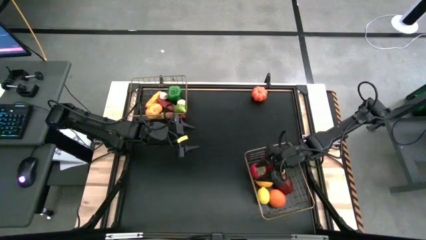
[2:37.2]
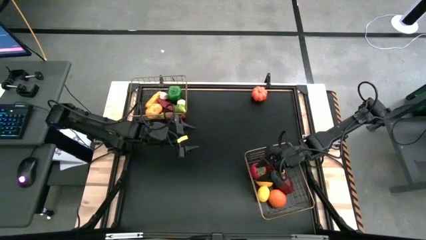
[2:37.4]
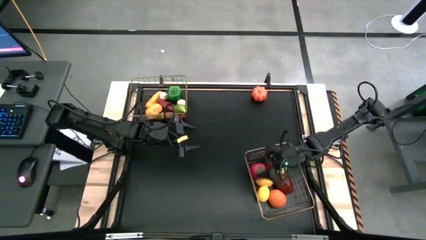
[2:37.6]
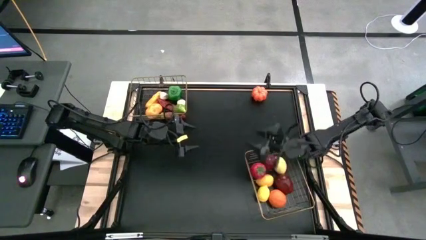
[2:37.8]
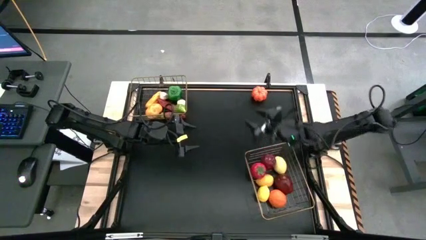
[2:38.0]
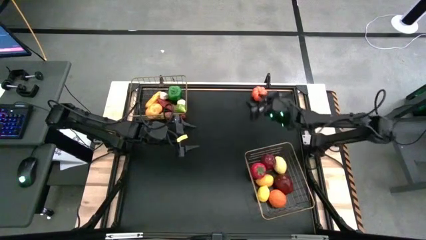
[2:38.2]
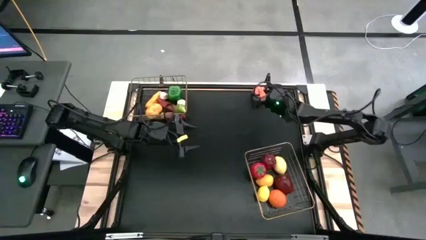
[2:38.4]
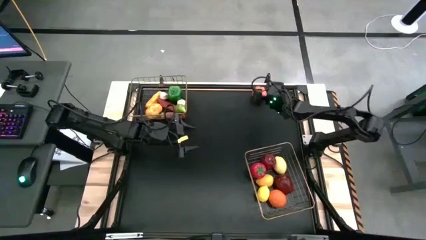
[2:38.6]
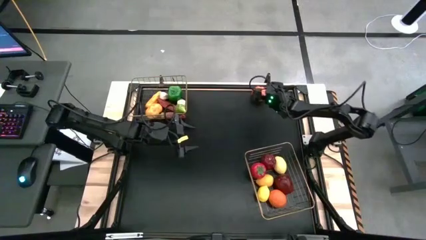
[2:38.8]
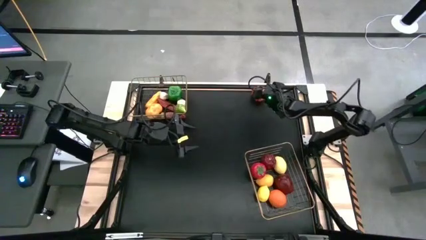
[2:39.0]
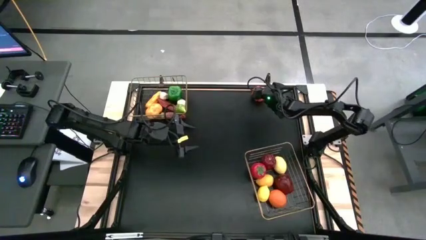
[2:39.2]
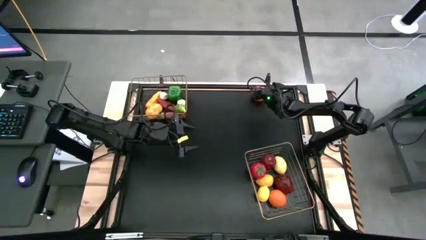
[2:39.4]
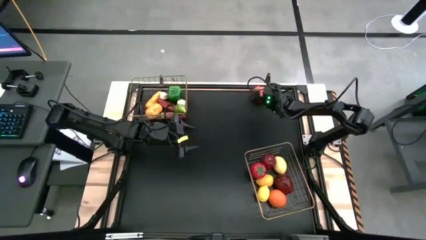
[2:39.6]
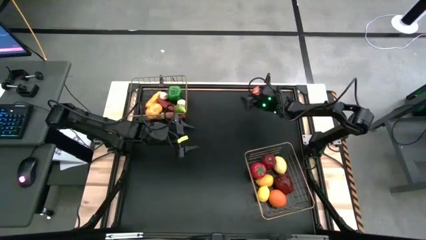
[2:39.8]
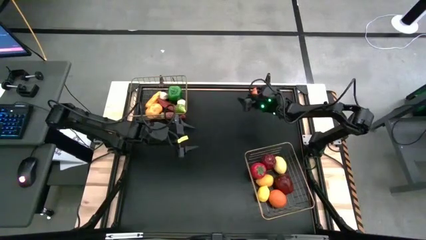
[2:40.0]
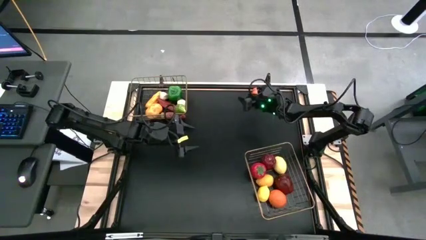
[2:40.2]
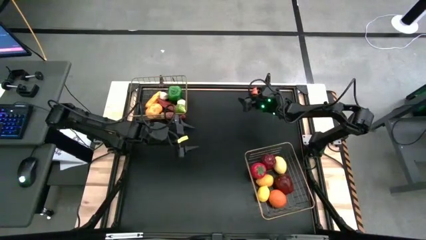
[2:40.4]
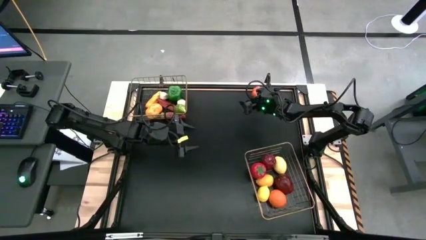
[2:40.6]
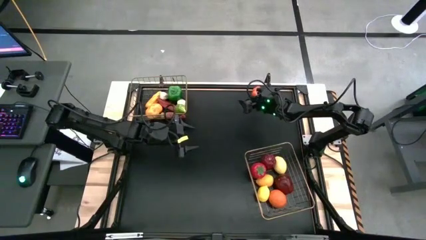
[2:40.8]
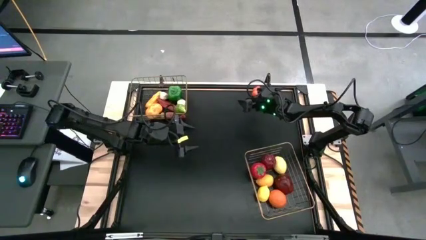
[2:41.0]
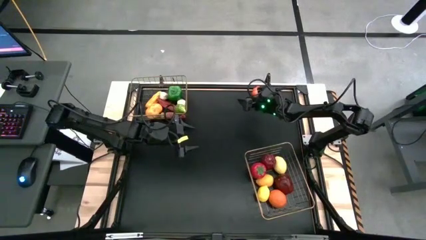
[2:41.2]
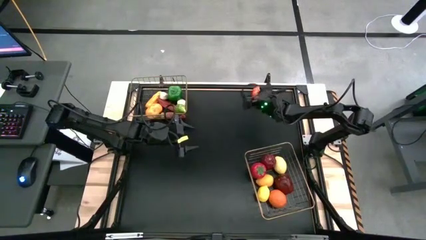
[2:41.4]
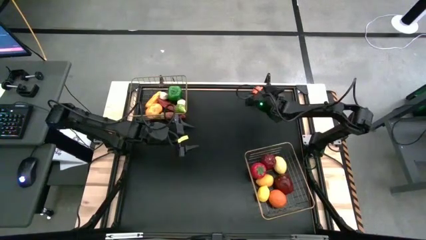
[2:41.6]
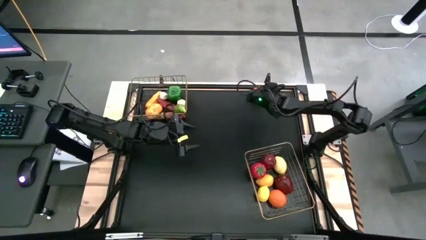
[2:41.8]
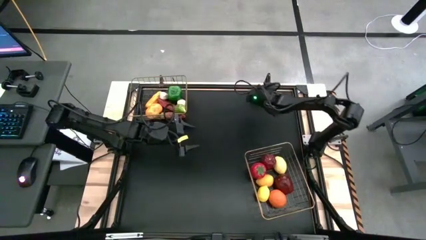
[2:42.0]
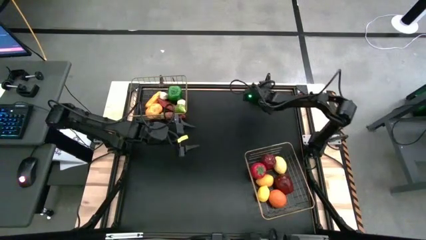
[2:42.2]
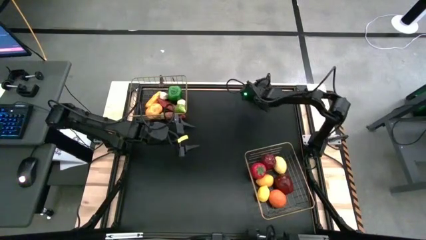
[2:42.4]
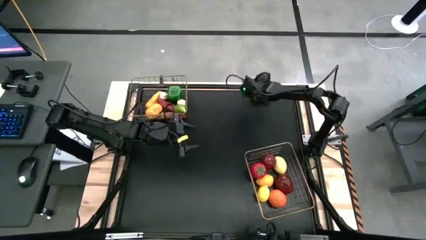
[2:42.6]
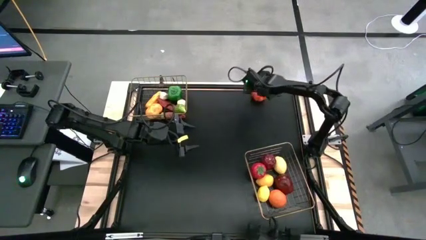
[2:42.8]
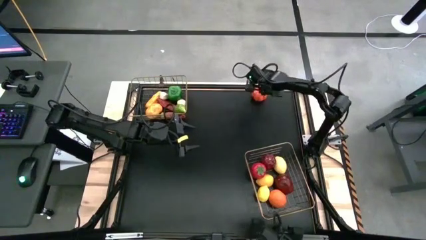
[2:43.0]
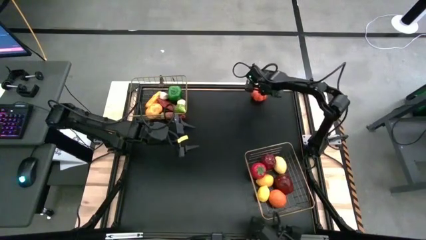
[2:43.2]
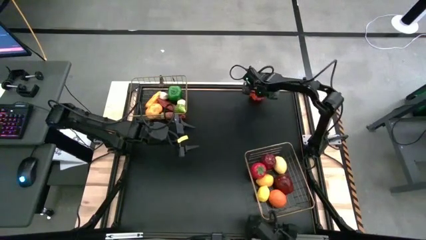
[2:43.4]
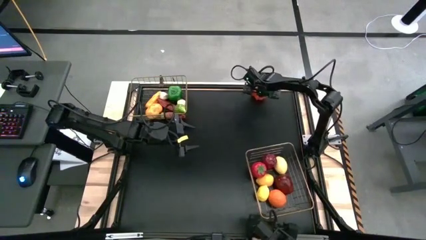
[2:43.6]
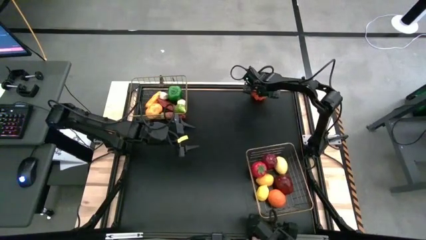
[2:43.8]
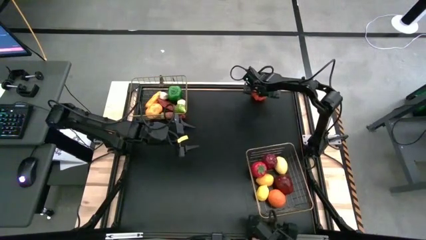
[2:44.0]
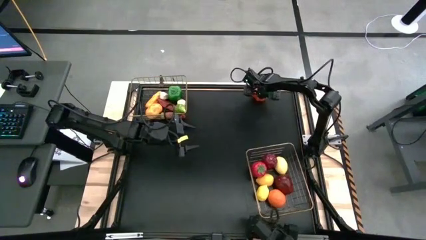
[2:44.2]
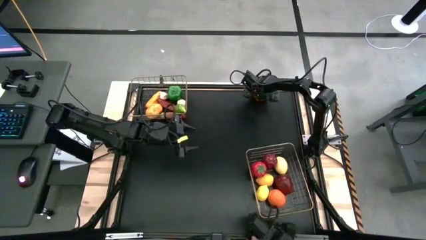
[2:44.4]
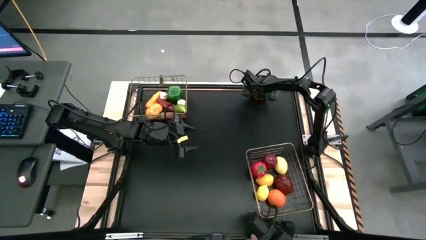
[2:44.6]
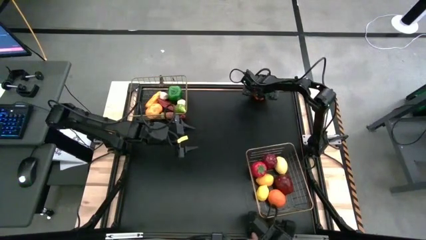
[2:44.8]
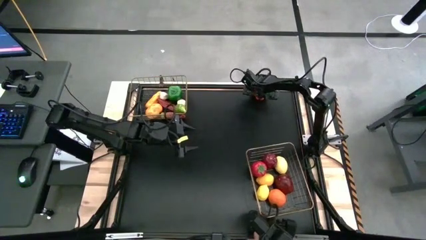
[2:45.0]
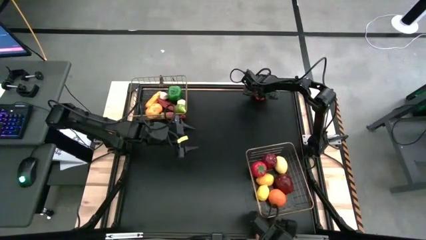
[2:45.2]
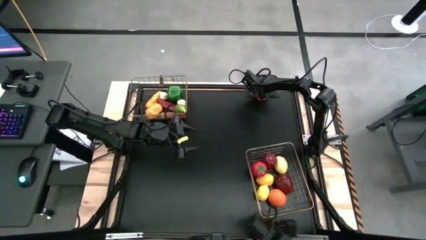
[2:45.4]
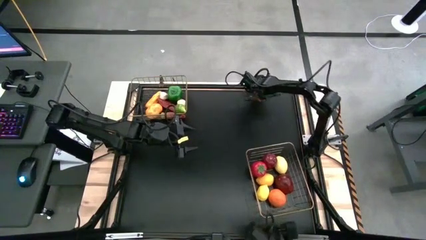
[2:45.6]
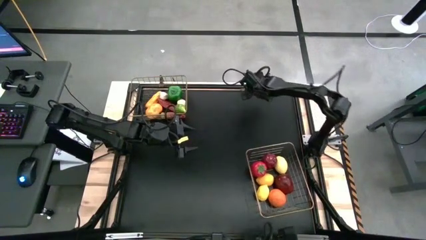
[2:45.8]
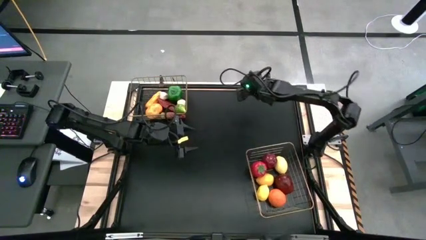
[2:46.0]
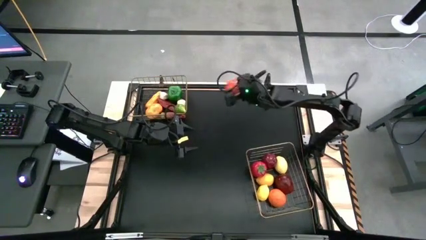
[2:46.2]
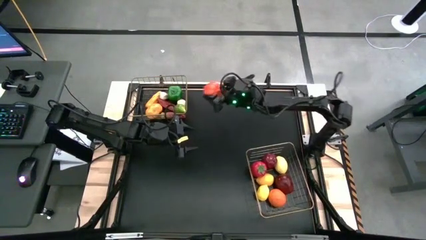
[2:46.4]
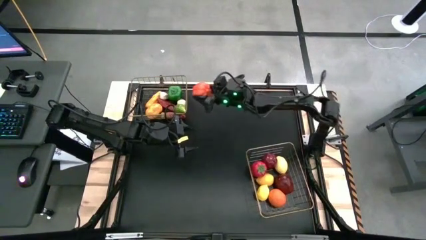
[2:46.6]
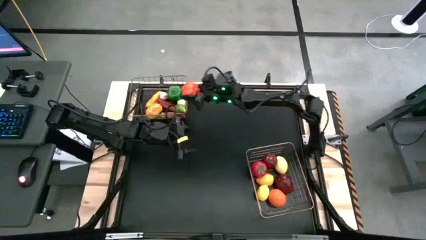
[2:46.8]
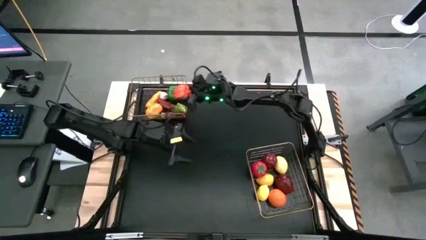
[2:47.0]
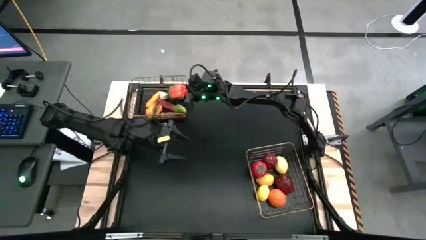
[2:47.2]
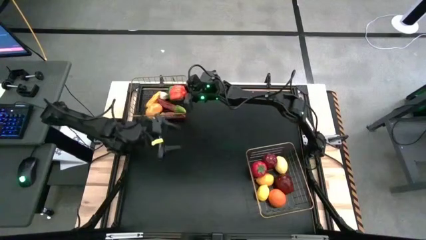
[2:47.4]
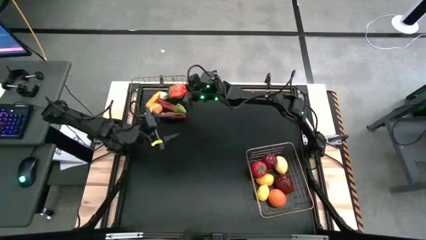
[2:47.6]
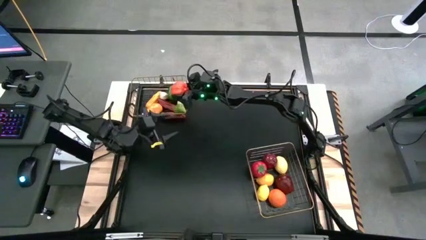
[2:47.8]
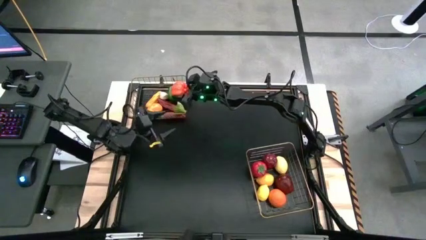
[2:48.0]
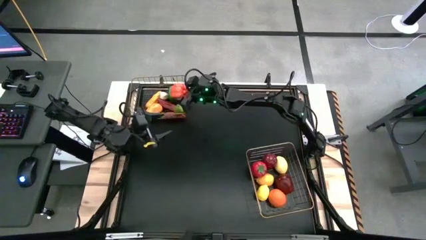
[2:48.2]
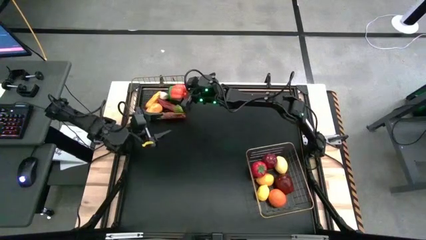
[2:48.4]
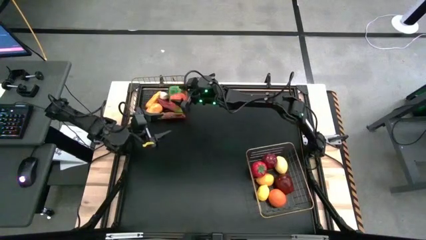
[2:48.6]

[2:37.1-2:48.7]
Task: Sort produce into baskets
Put the orange pumpkin into the top wire basket

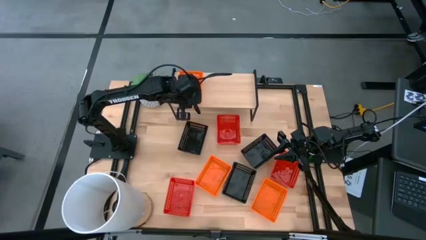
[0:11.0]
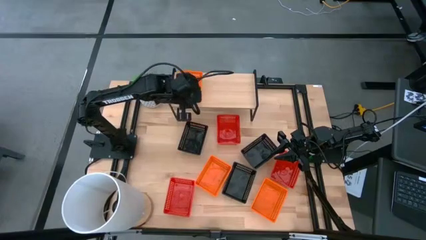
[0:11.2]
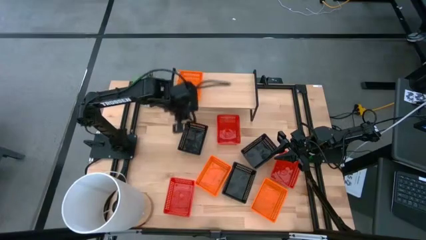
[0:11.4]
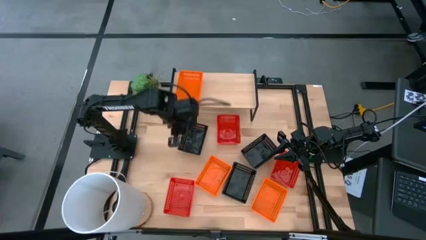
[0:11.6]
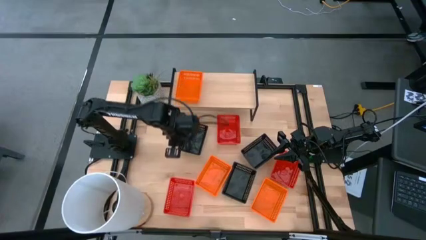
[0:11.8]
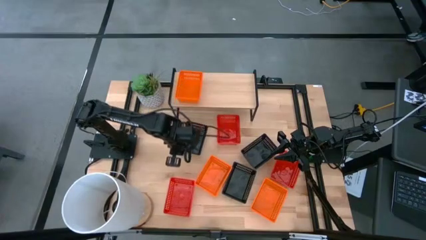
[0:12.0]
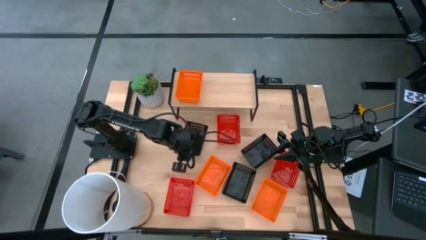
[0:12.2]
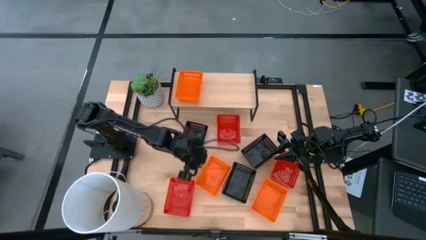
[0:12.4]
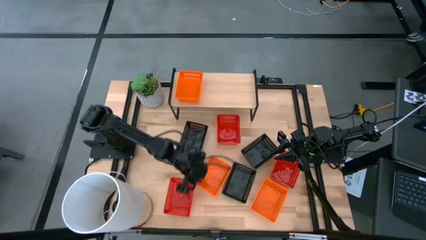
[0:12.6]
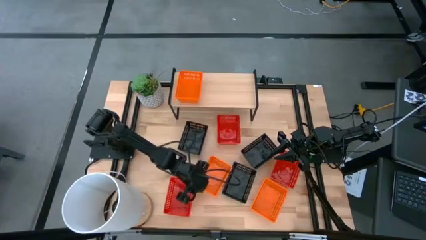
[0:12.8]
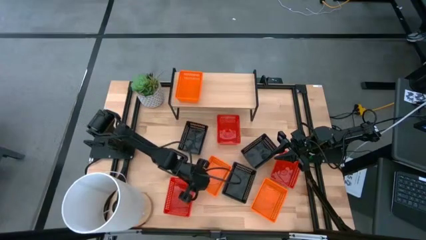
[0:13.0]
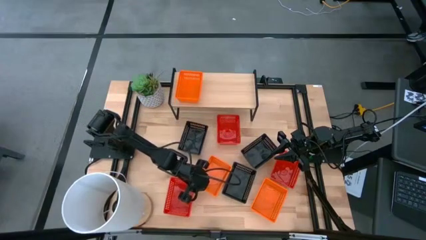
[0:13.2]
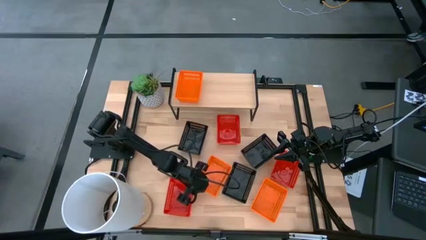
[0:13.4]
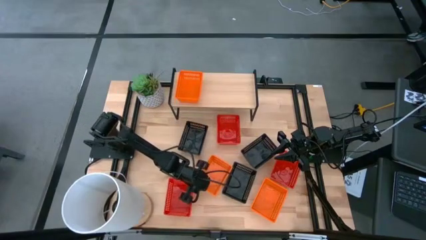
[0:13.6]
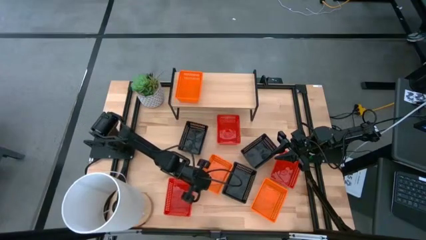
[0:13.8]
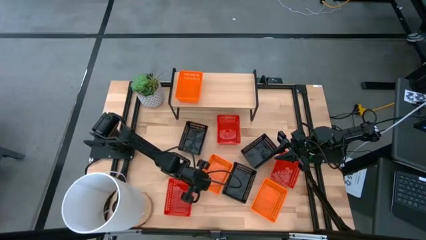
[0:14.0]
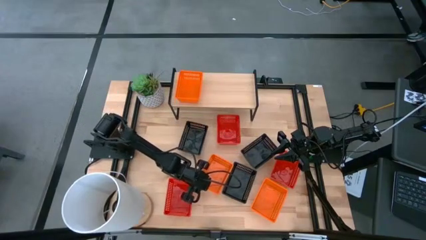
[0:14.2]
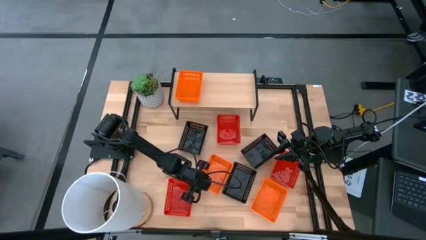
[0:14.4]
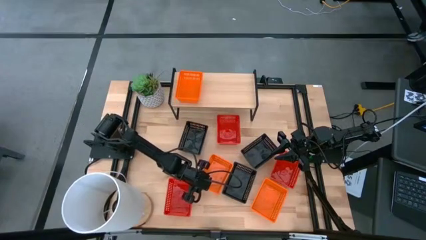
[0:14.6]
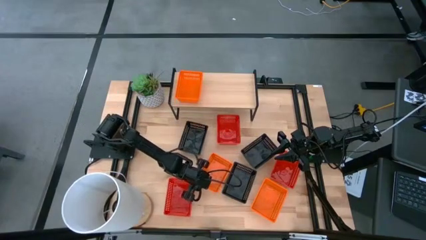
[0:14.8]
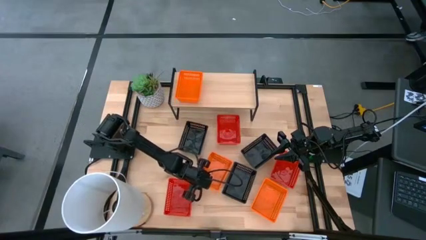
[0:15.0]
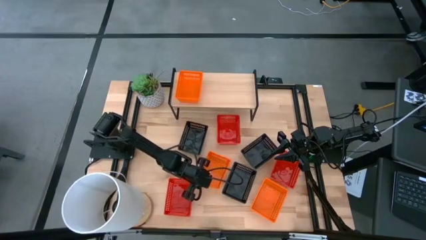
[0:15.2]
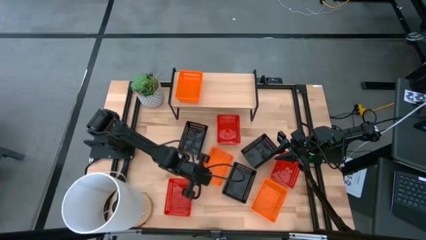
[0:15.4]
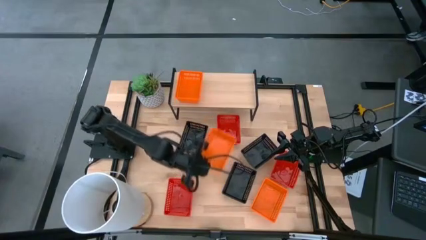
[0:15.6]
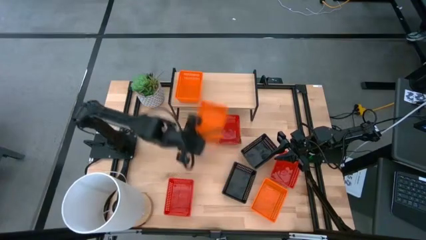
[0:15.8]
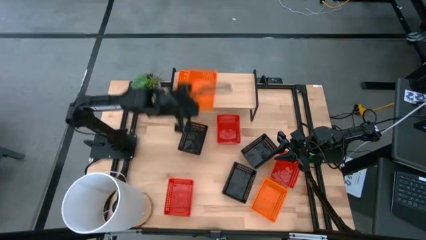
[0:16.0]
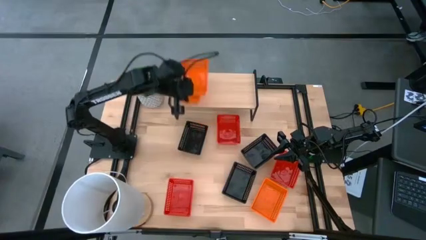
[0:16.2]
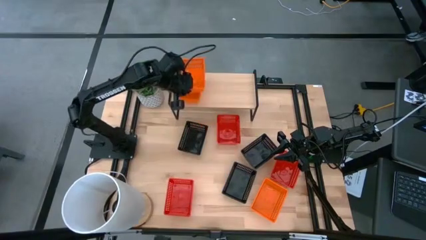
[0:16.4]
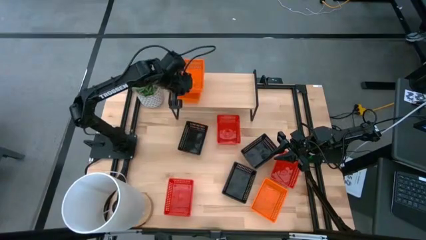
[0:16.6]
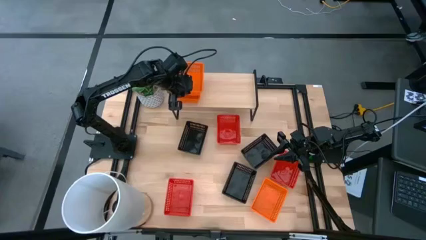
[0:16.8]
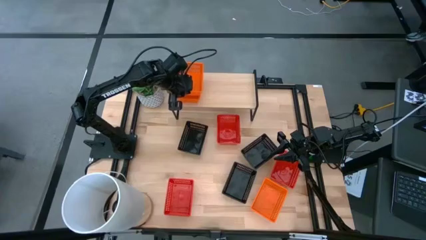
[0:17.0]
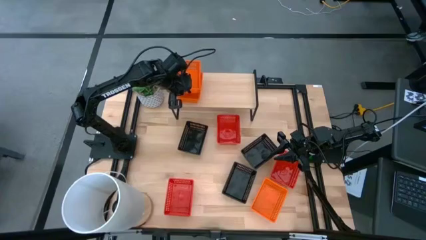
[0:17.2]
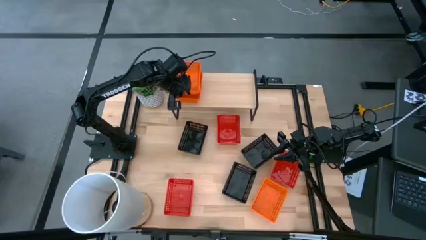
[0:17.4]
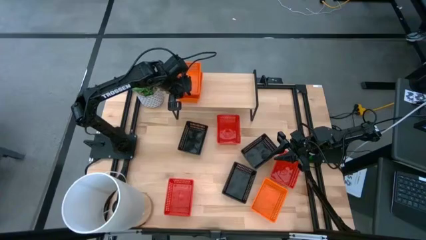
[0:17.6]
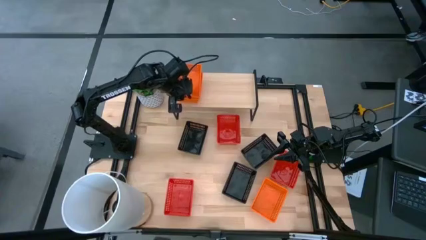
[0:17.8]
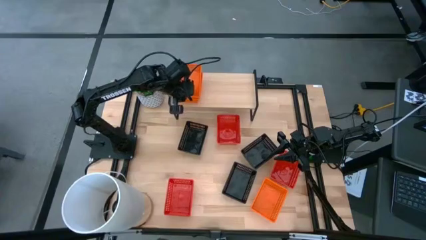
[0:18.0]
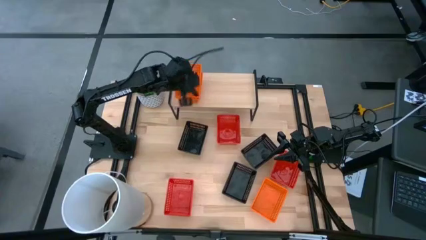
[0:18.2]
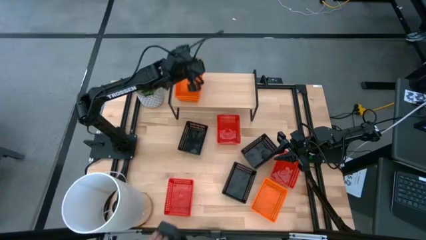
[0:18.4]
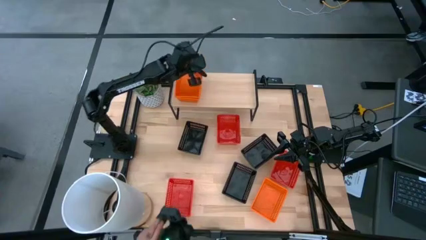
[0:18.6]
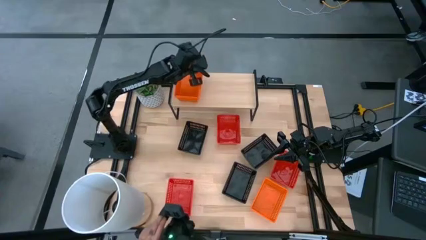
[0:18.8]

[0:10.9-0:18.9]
Task: Stack baskets on shelf by color
Stack the left orange bin on top of the orange bin on the shelf
